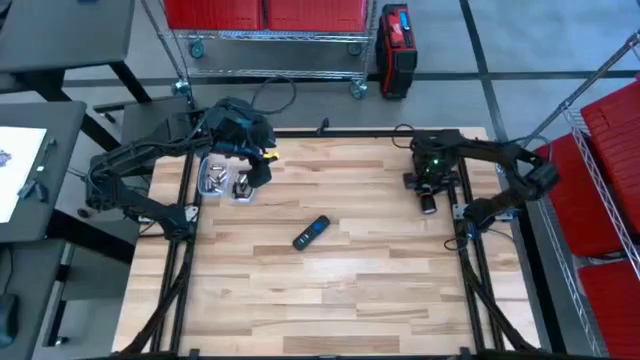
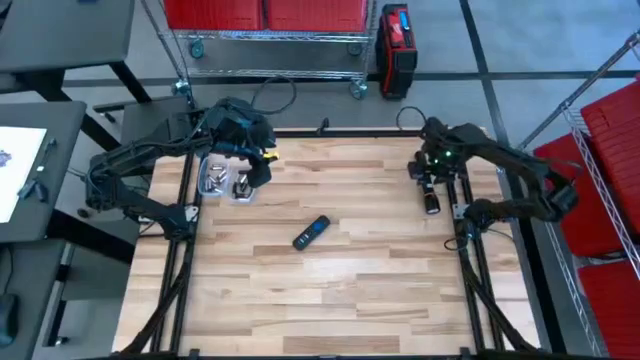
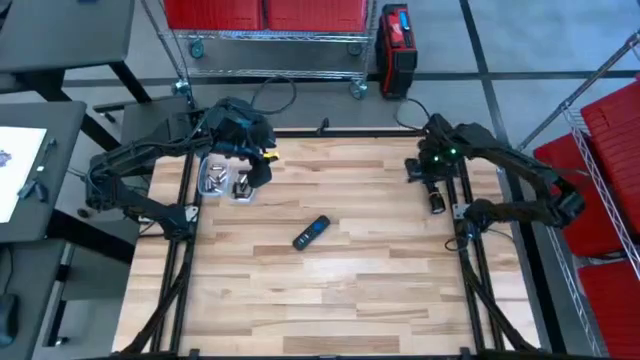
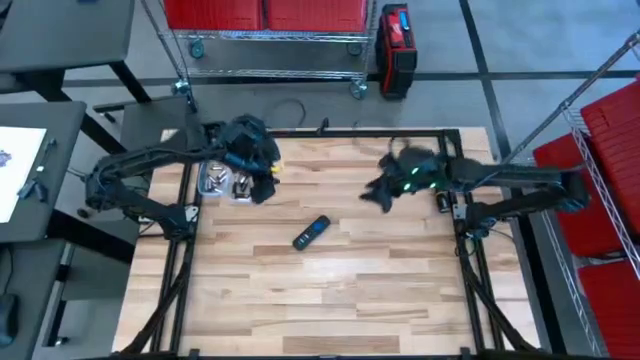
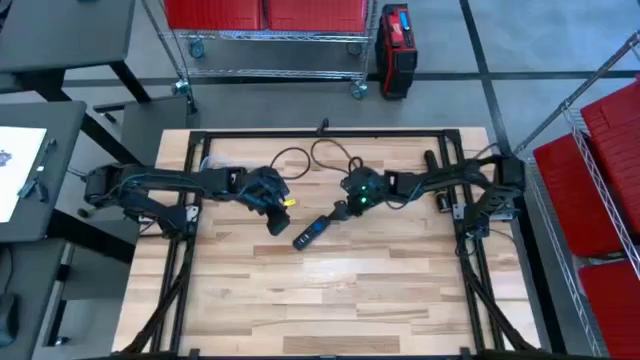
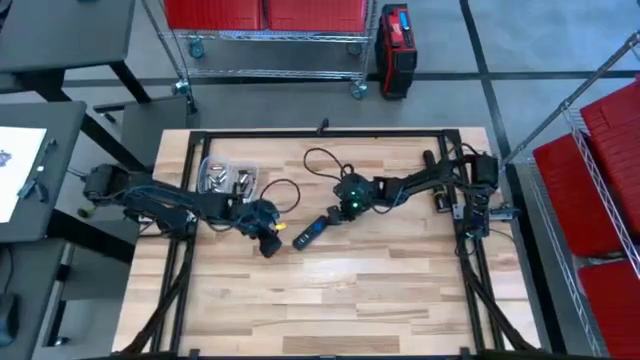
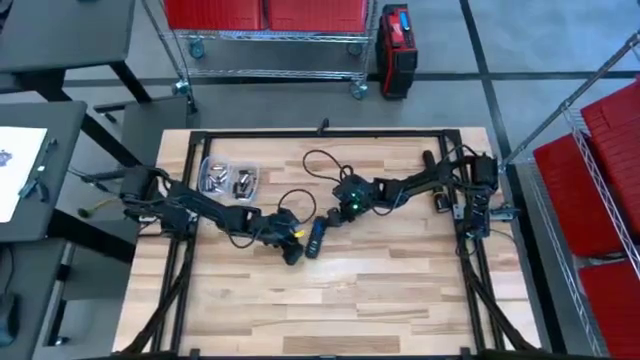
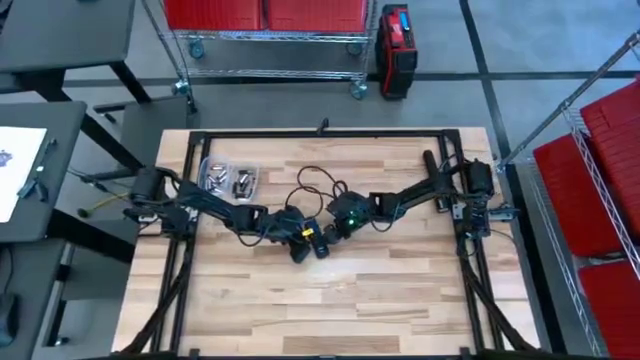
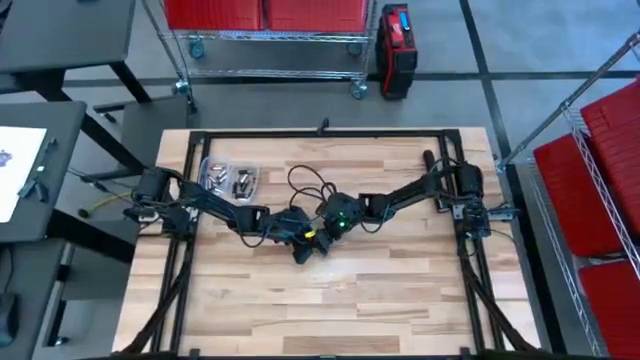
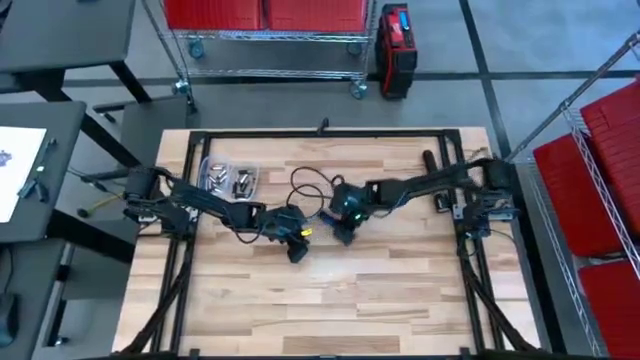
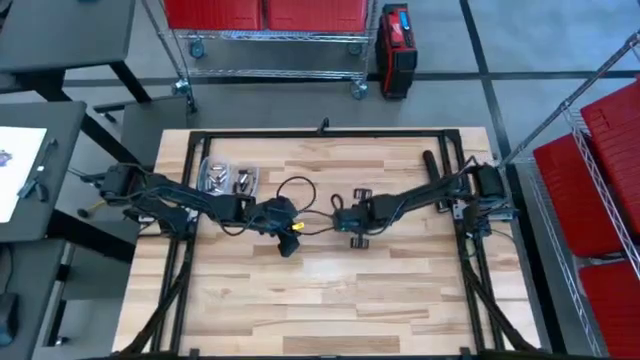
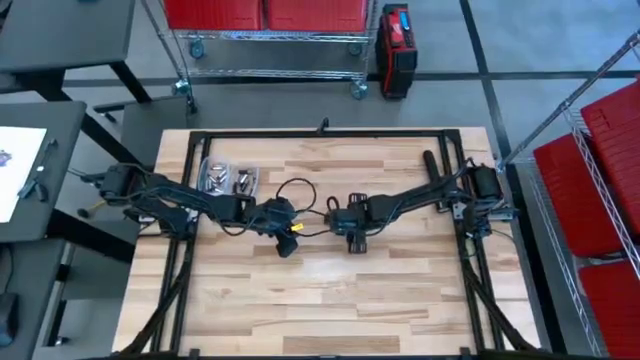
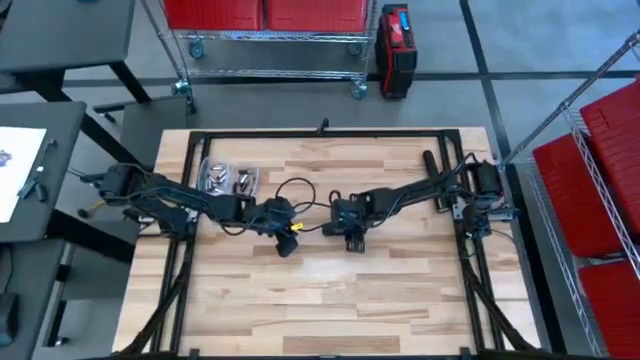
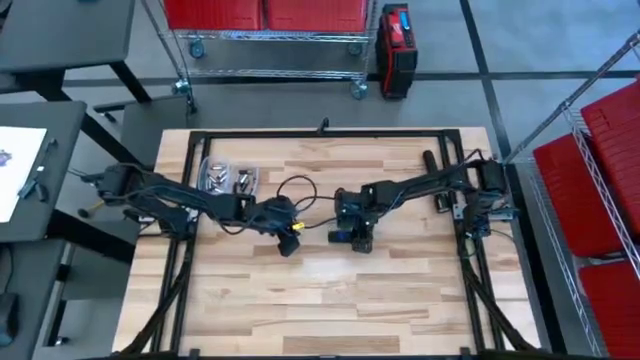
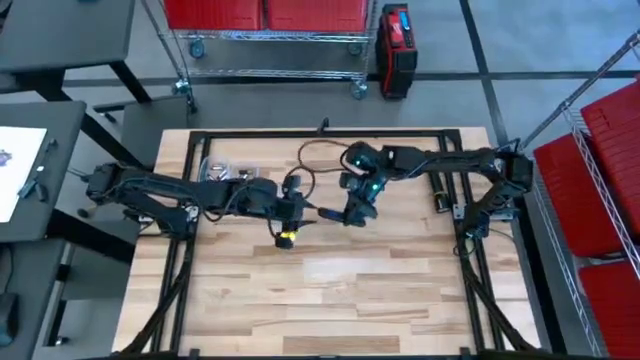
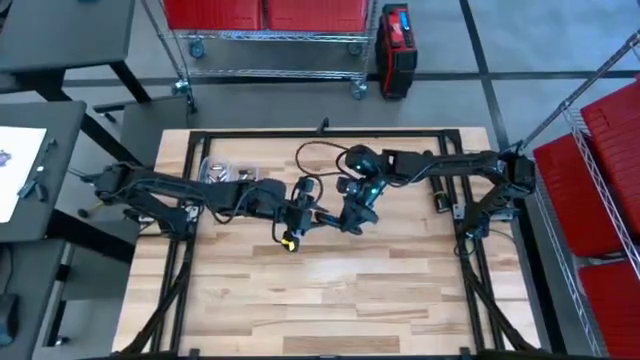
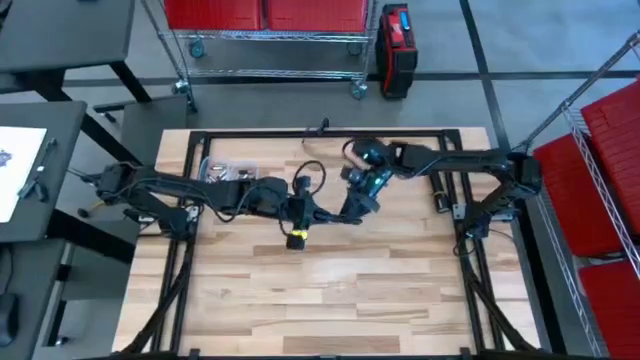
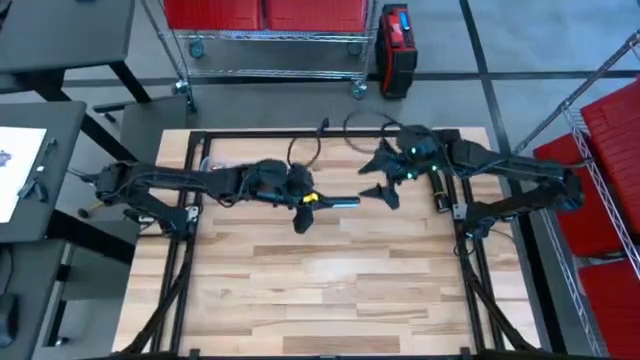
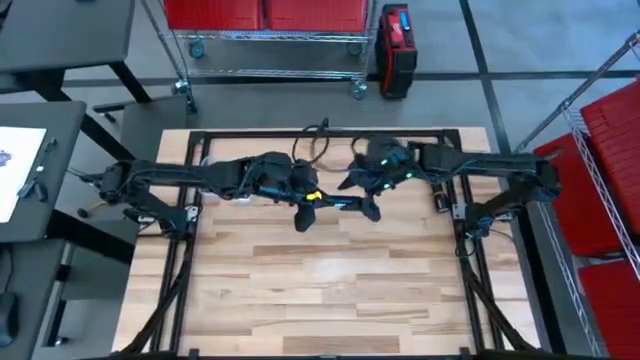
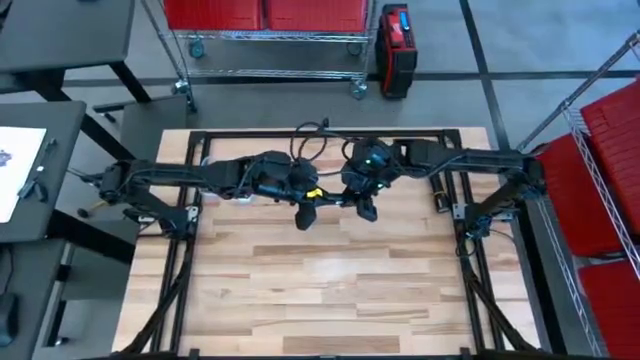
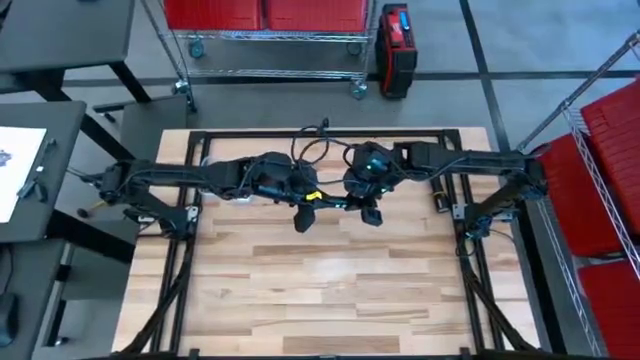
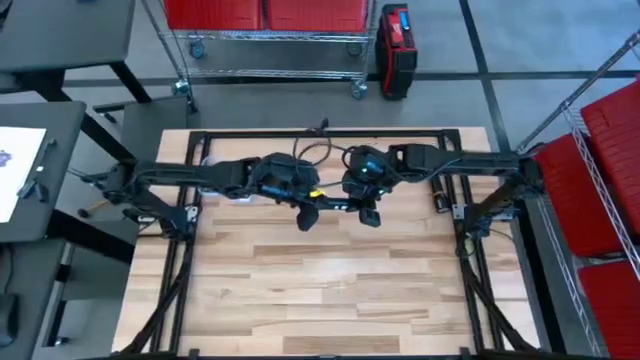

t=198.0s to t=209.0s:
Task: Insert battery
Open the remote's battery compartment

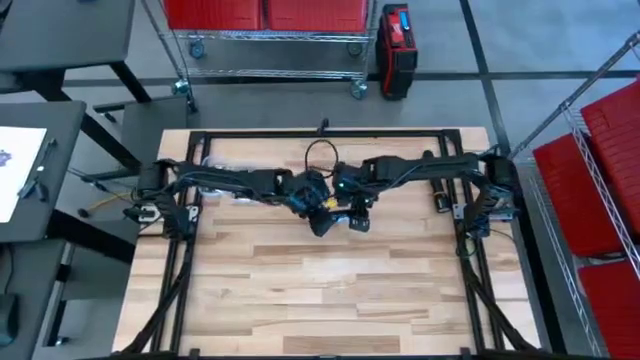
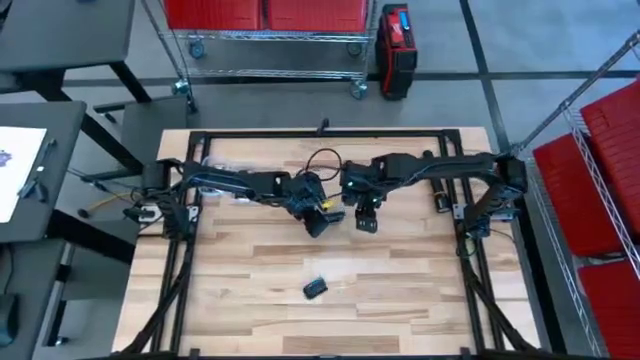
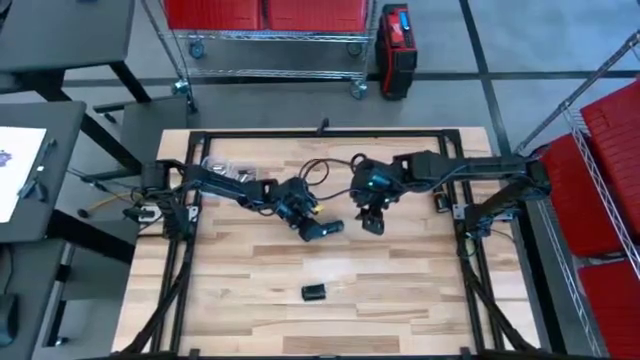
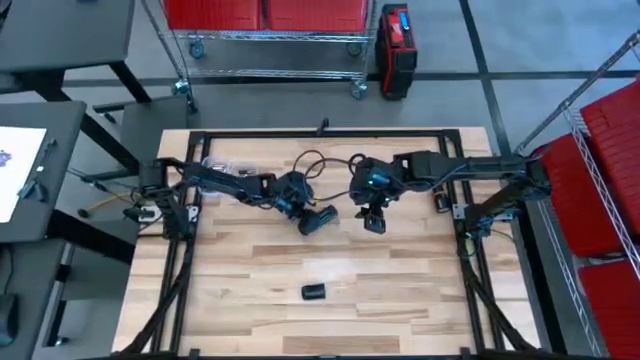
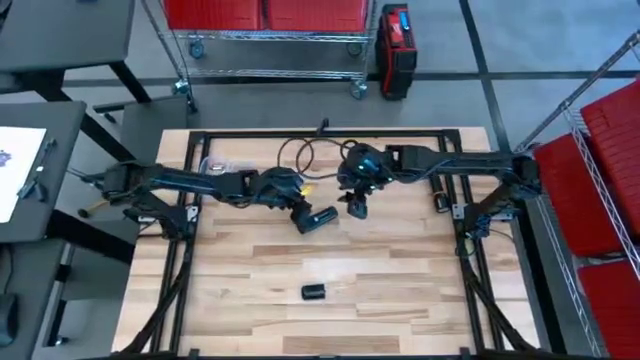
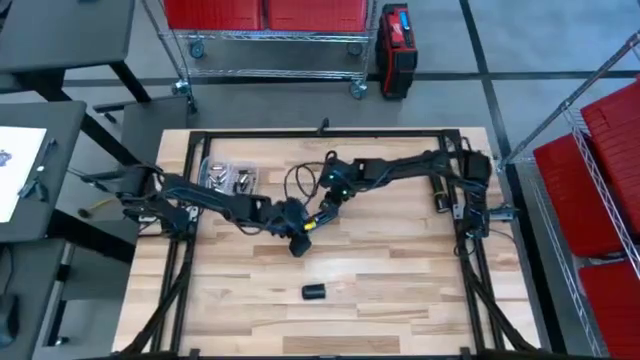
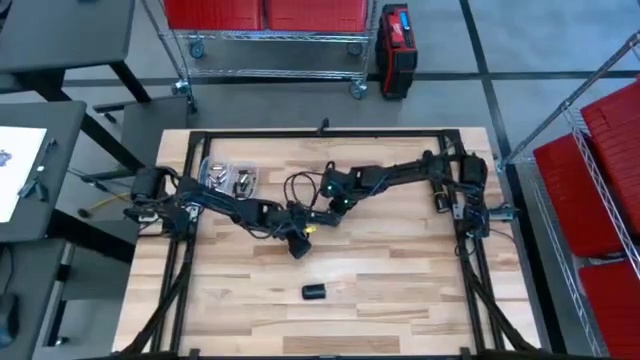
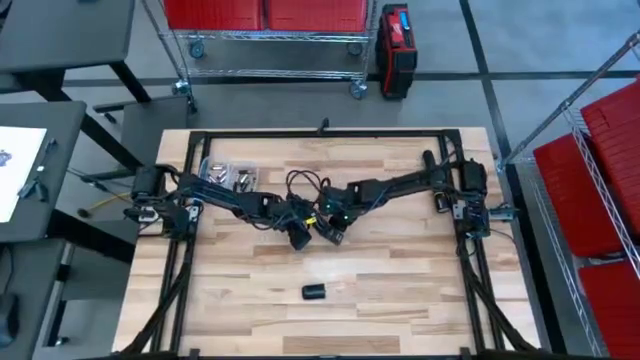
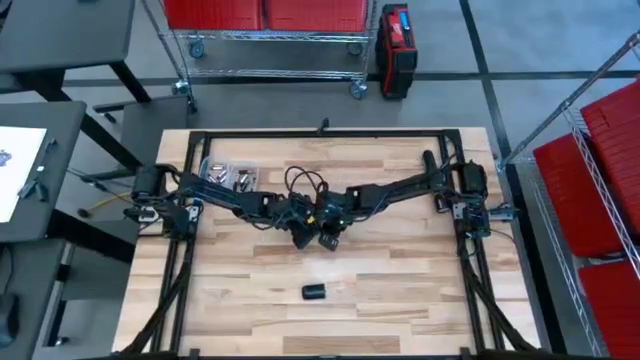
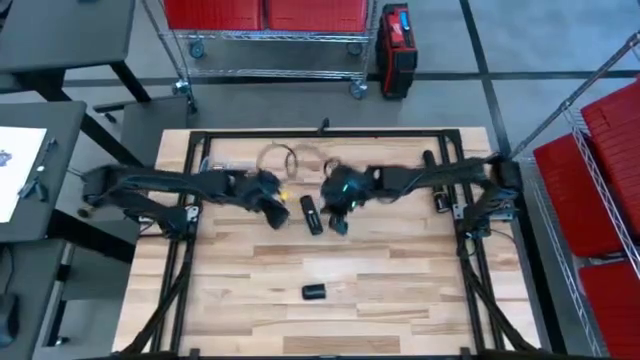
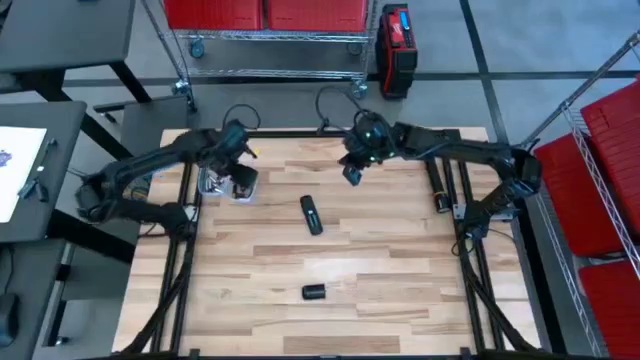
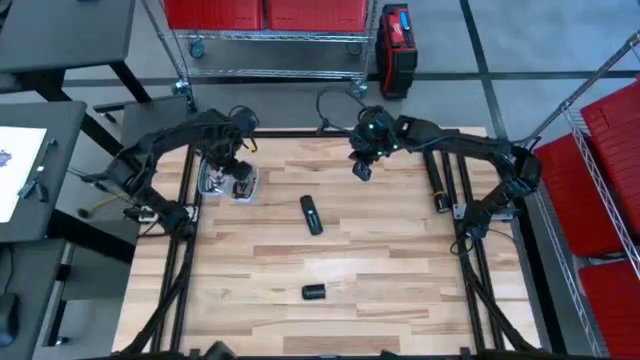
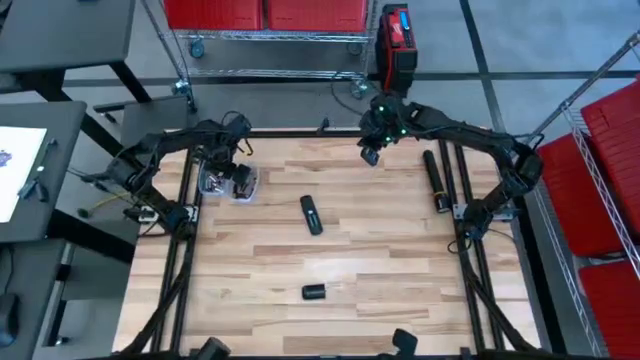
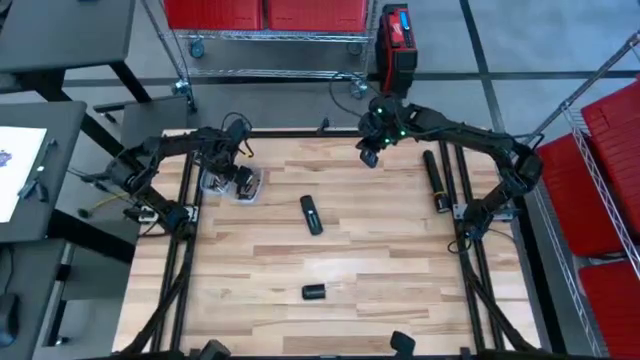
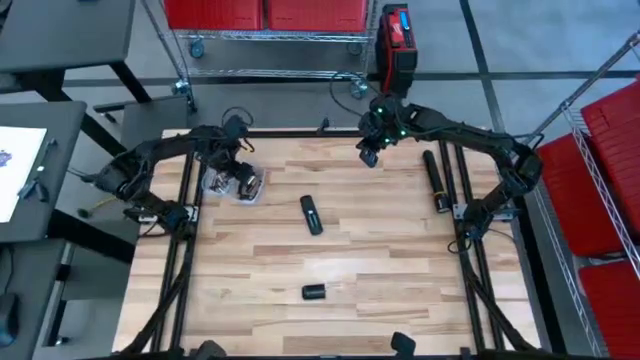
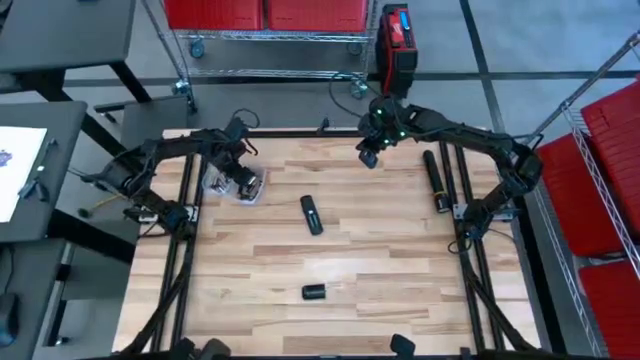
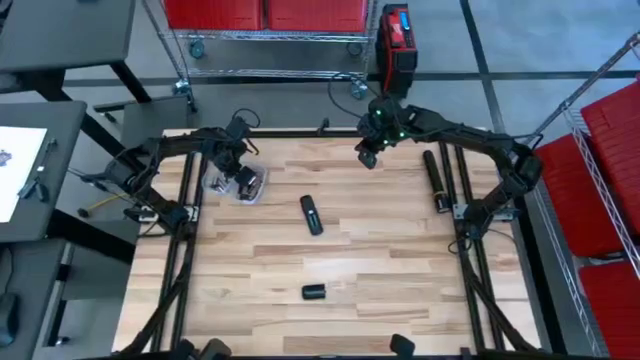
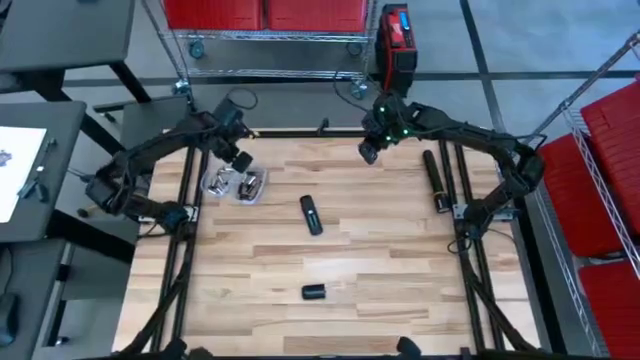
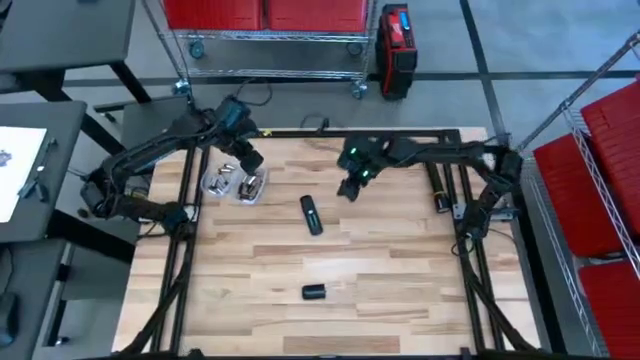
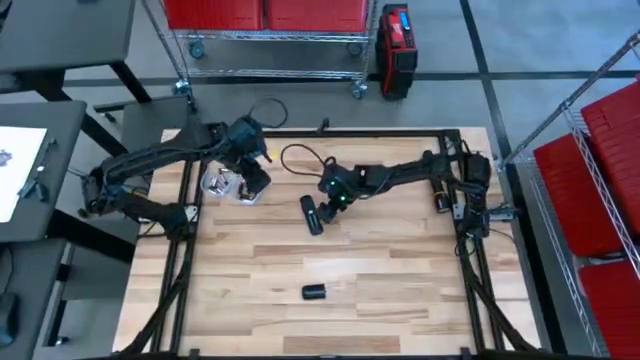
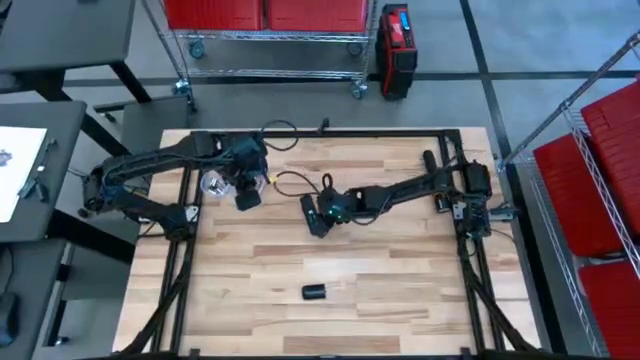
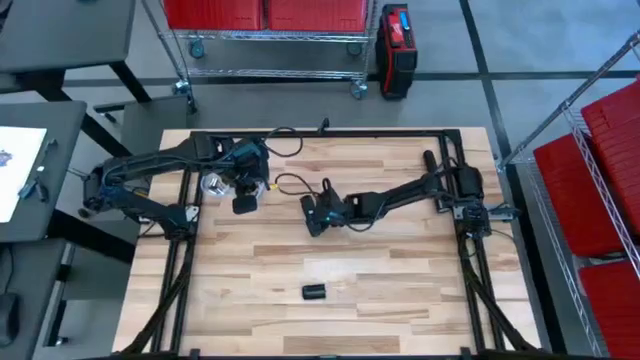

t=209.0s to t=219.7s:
Insert the silver battery into the remote's battery compartment
